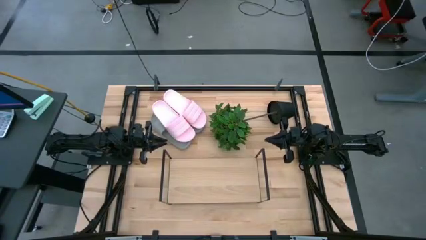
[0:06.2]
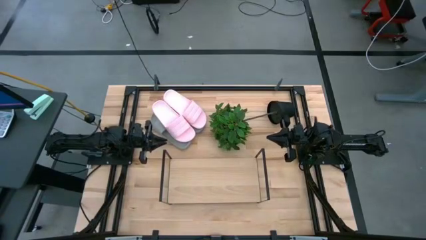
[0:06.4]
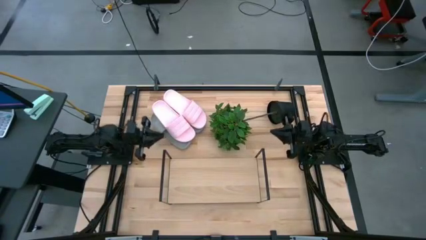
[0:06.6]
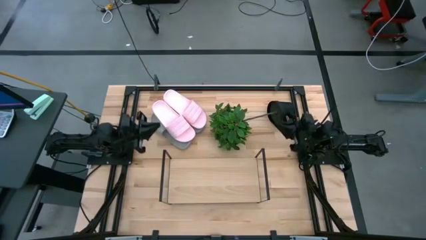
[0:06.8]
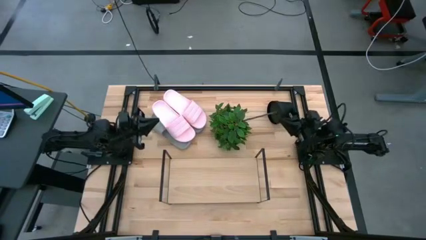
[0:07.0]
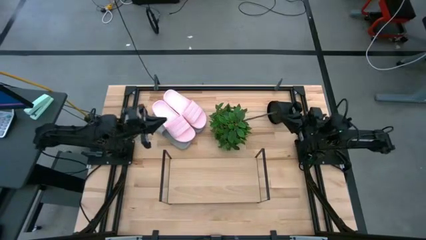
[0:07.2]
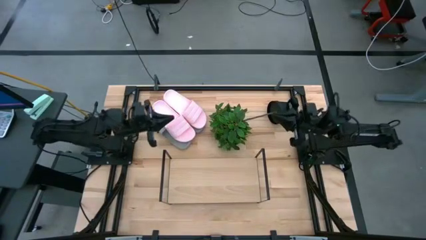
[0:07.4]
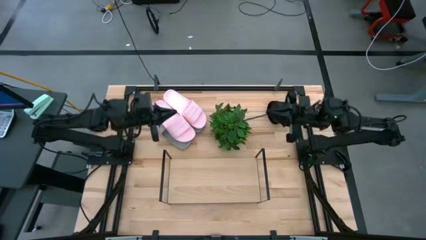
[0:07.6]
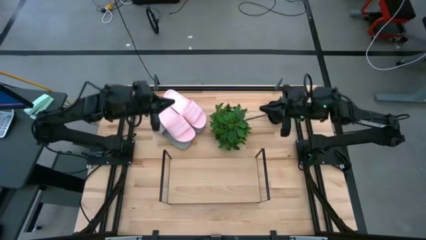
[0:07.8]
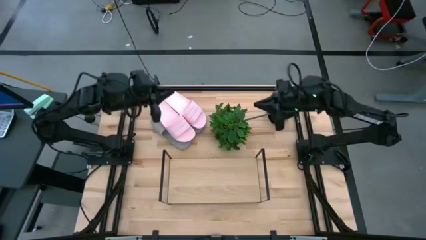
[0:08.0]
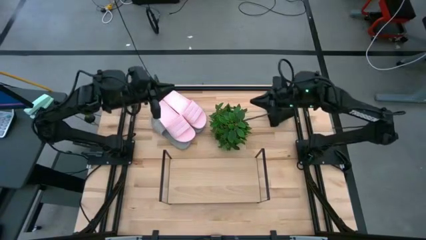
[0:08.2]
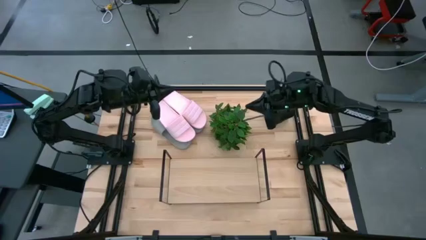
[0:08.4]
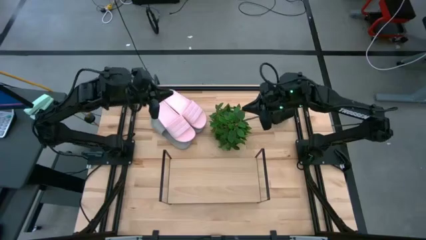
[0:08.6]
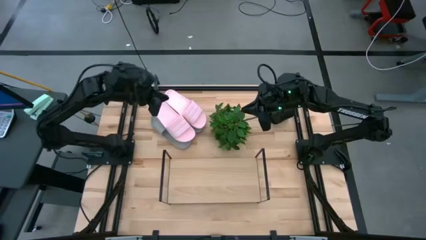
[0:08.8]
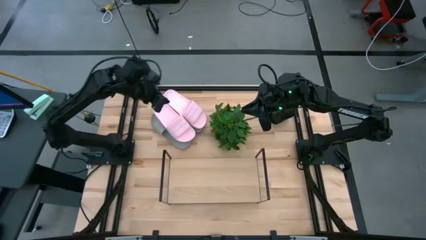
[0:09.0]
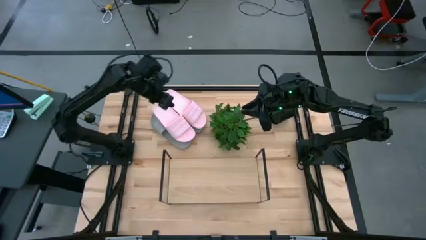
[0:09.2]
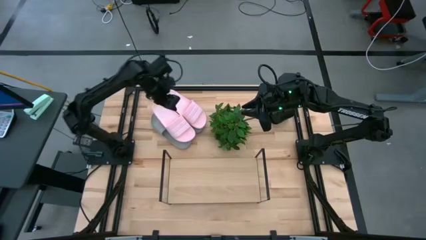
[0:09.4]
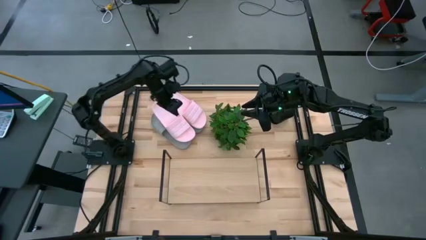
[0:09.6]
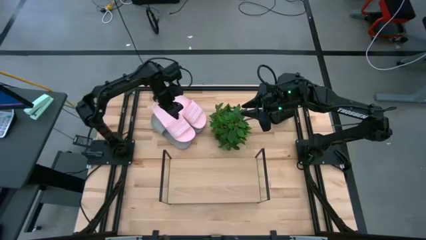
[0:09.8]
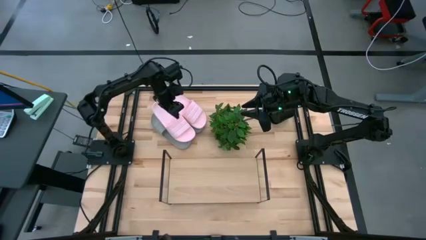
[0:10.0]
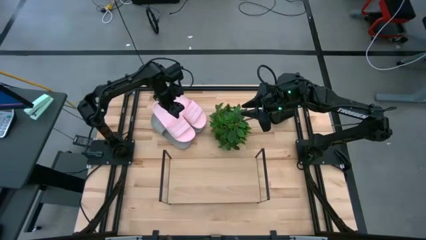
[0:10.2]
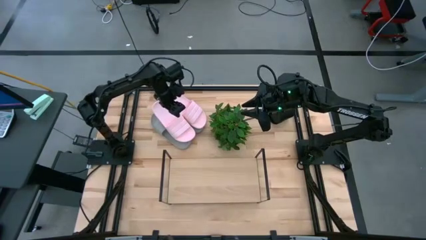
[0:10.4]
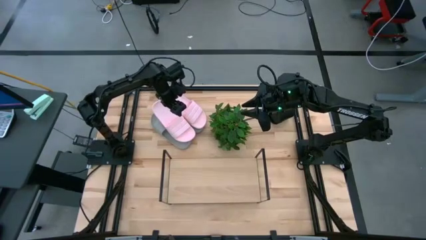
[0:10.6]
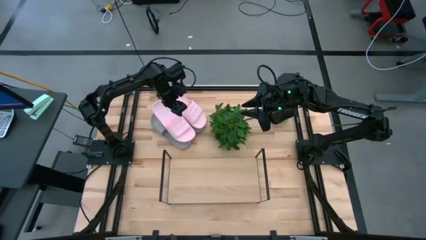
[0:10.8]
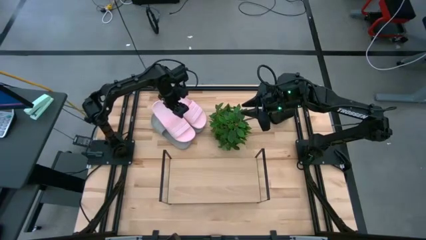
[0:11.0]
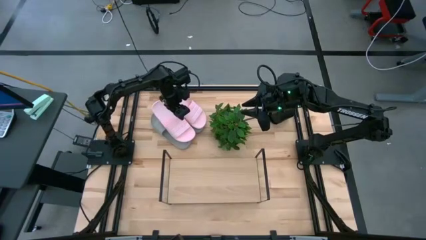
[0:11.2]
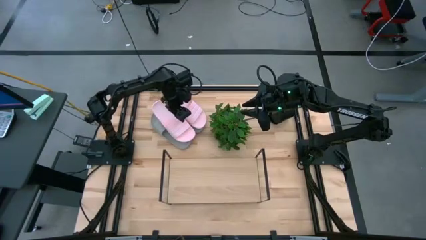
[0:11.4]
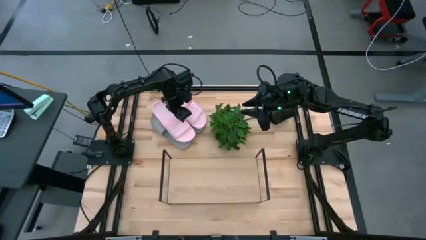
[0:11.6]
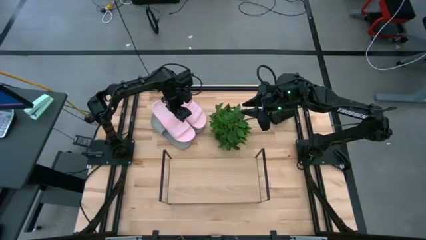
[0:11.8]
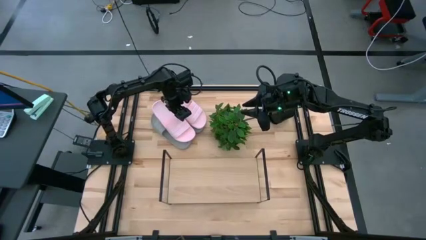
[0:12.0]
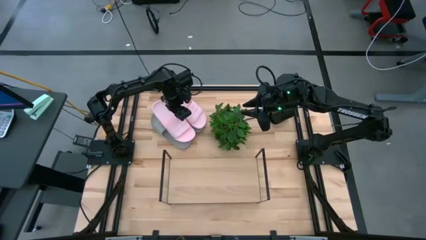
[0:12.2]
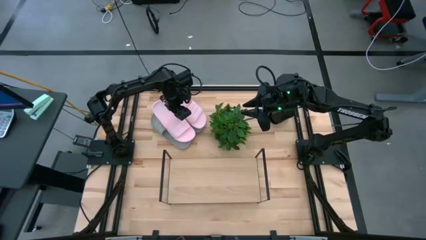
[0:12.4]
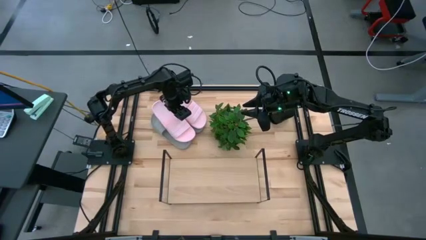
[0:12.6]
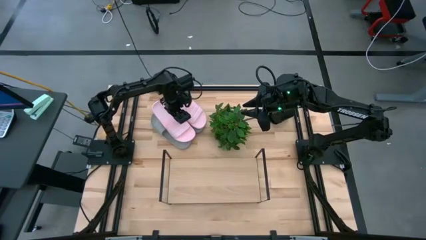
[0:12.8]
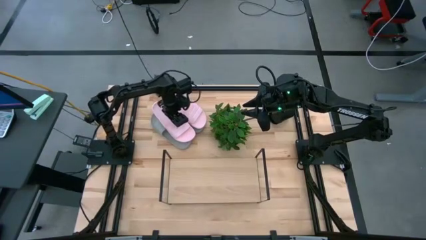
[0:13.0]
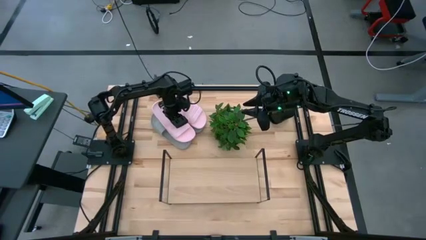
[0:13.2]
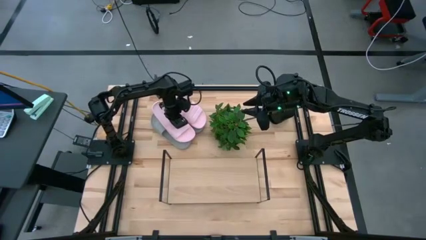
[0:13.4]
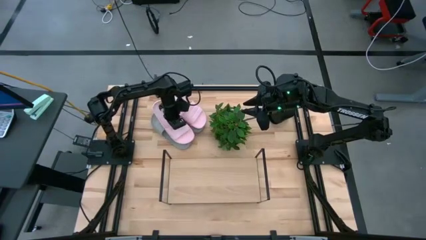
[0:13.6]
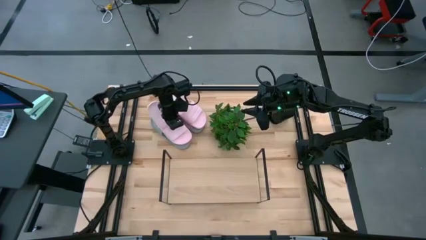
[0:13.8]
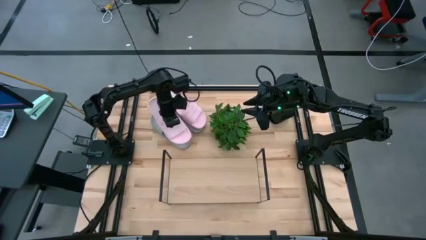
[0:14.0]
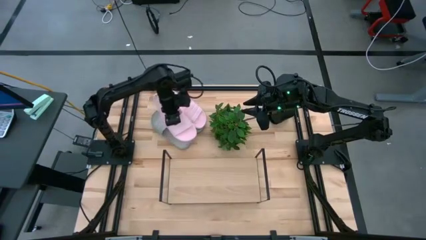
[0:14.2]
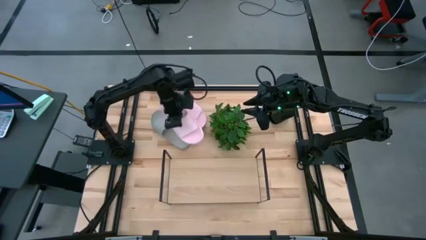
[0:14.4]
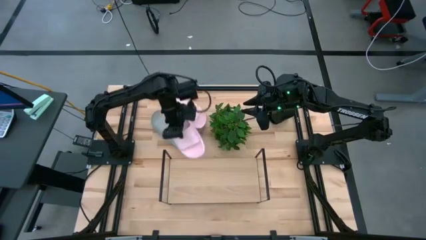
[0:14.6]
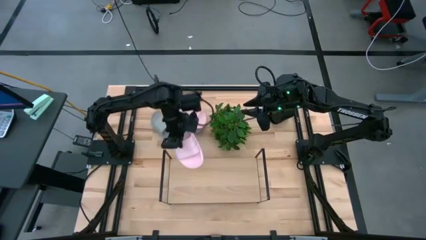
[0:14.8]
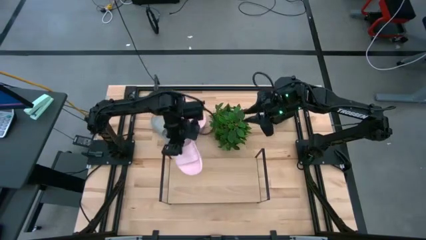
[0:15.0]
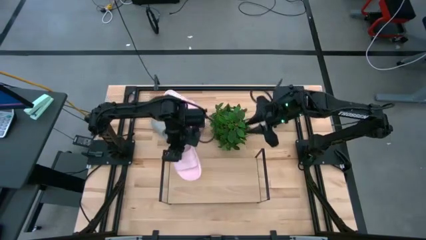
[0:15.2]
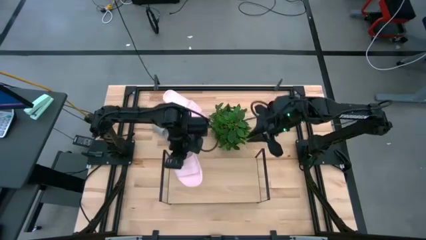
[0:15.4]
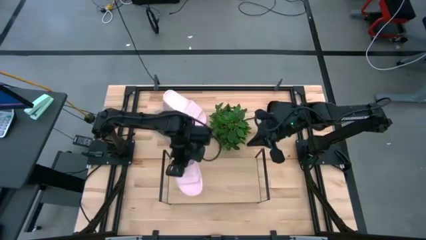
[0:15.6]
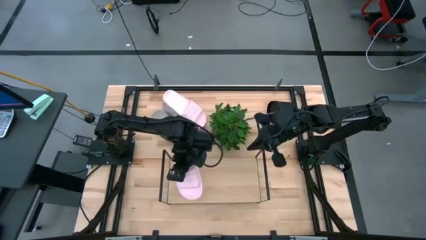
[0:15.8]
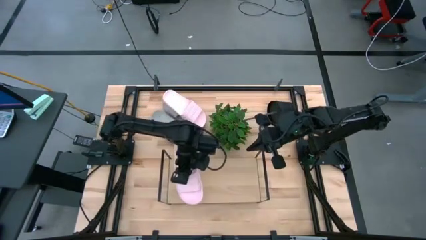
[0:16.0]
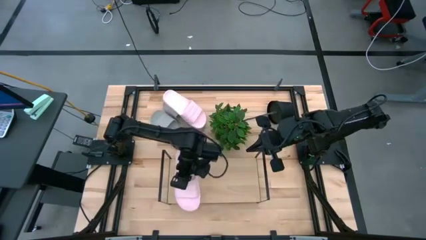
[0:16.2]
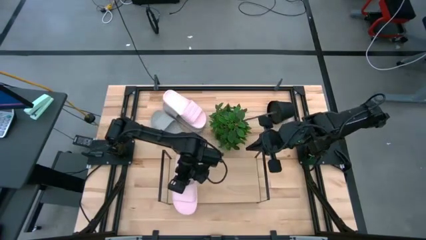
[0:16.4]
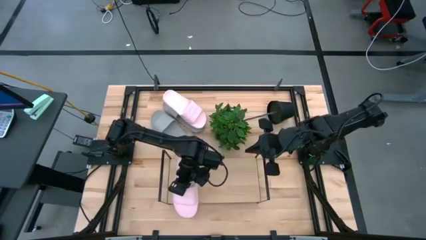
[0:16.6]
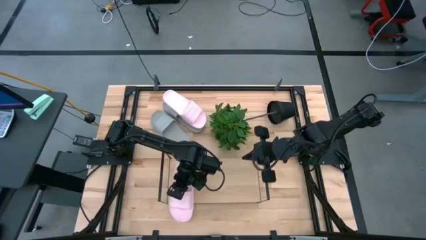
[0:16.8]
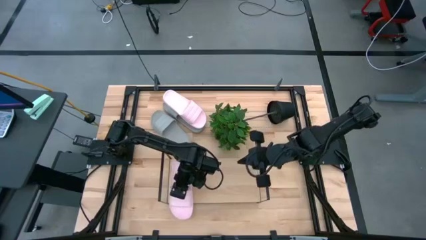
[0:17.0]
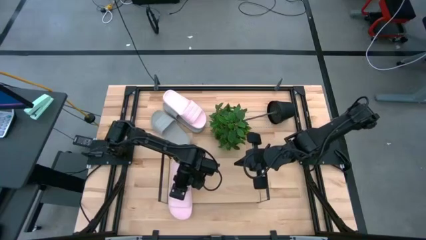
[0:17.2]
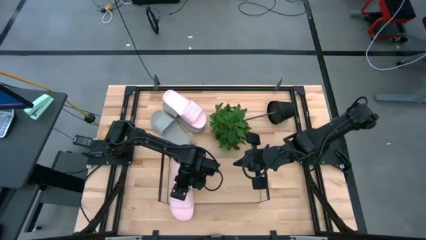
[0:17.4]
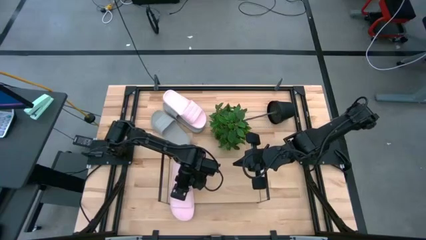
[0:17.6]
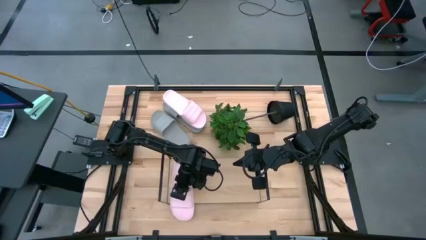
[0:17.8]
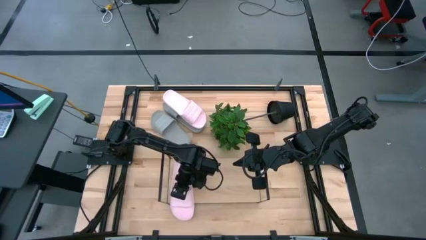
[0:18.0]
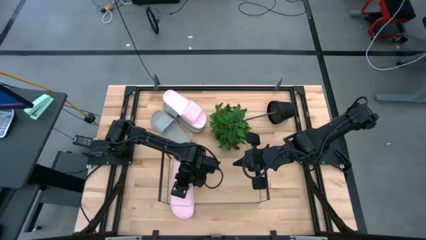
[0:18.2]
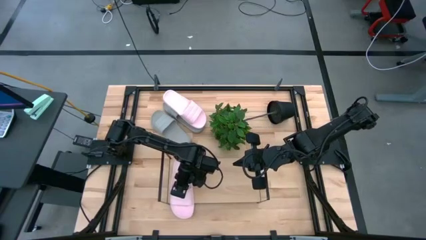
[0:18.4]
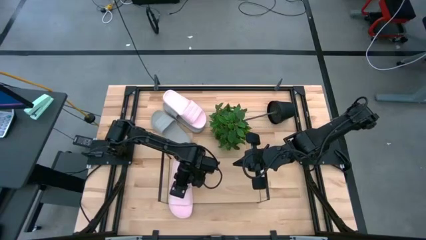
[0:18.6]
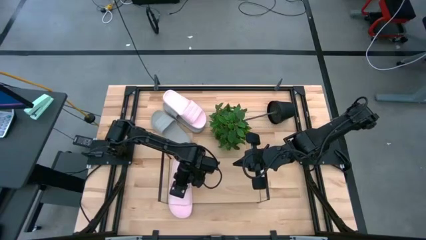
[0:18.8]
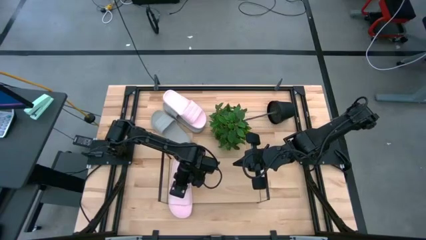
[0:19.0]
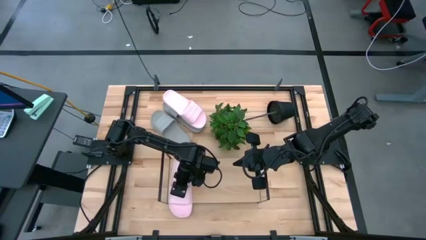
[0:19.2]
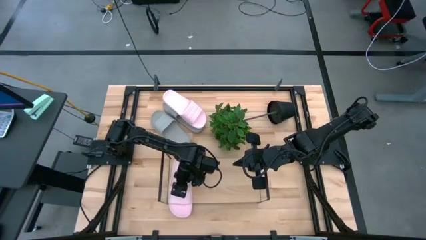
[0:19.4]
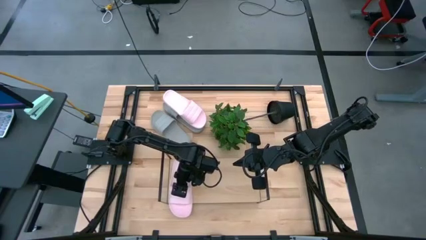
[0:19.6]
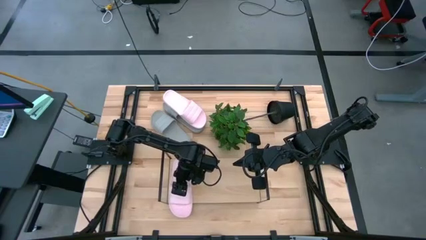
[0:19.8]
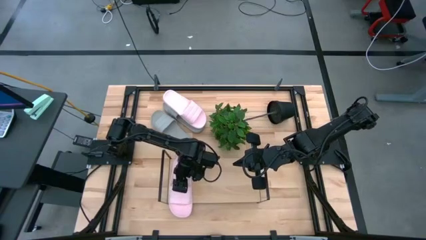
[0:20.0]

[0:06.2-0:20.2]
Task: Pick and place slides into the shelf
Put the left pink slipper on the shelf
